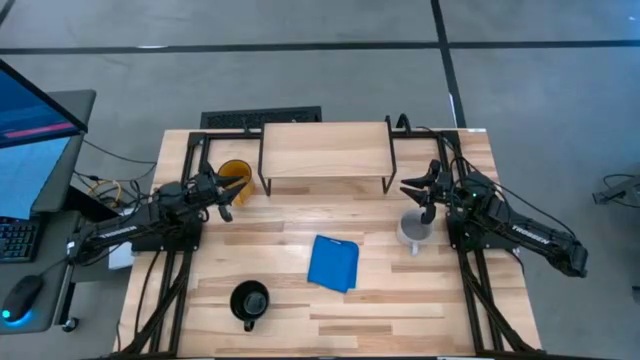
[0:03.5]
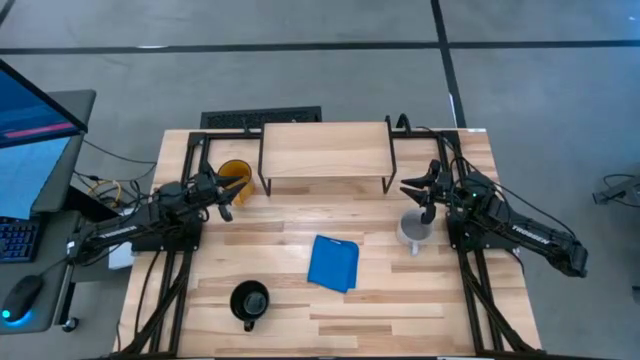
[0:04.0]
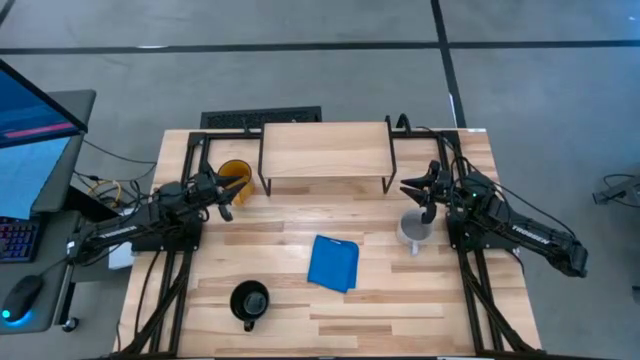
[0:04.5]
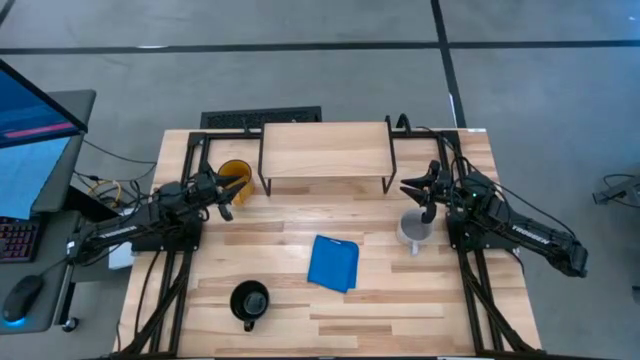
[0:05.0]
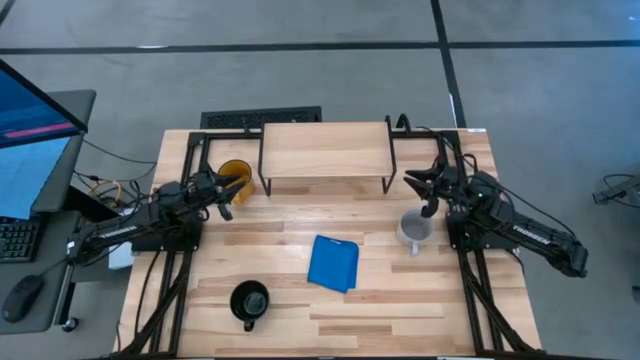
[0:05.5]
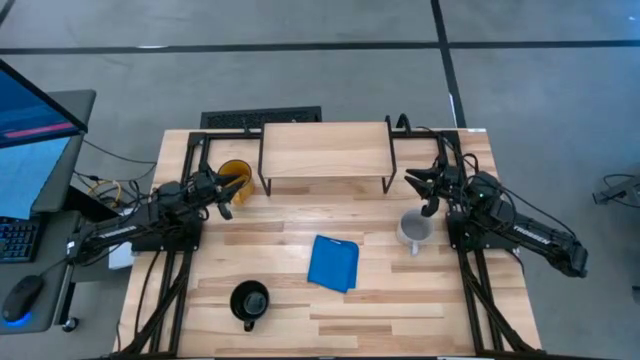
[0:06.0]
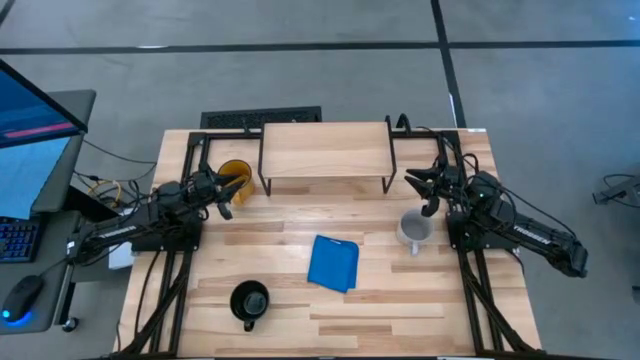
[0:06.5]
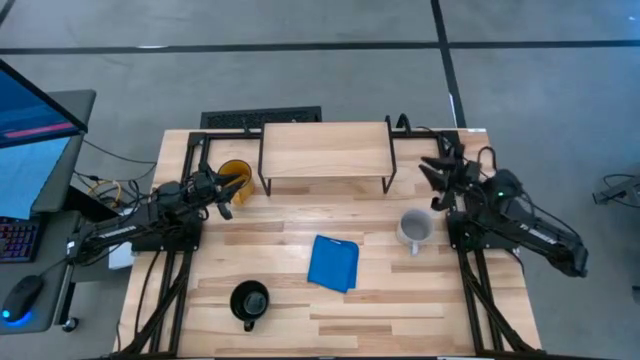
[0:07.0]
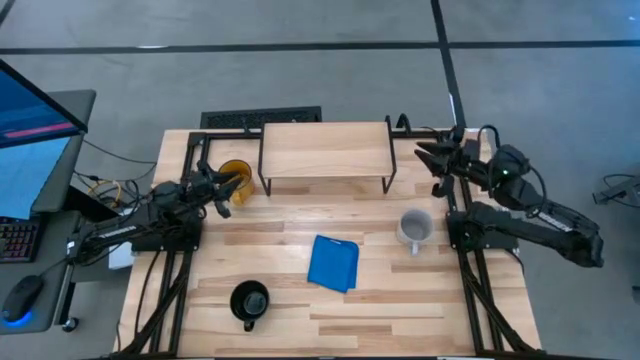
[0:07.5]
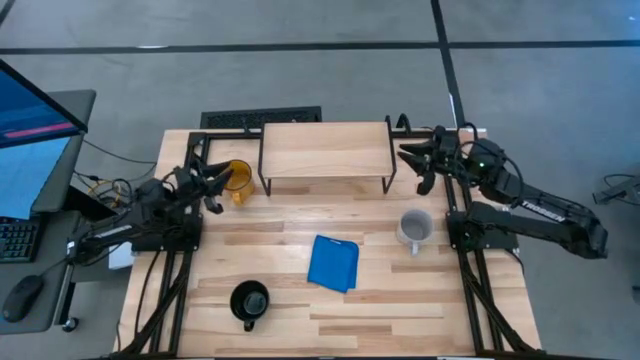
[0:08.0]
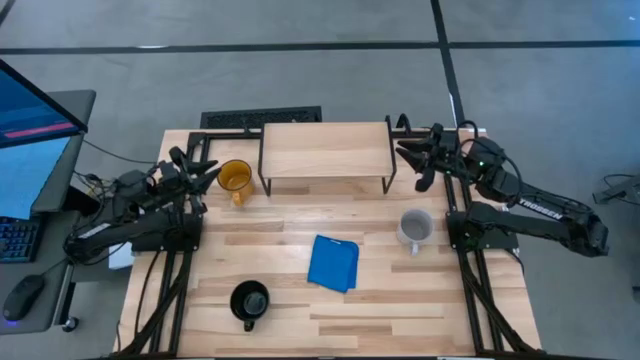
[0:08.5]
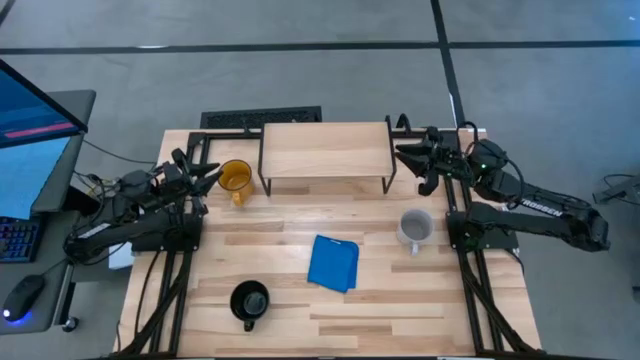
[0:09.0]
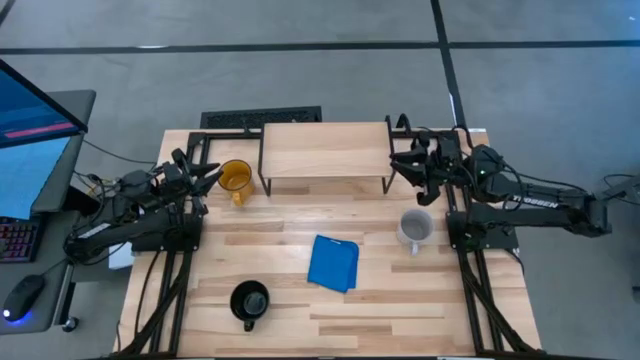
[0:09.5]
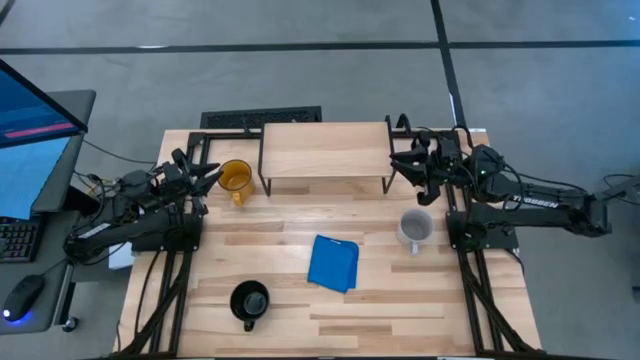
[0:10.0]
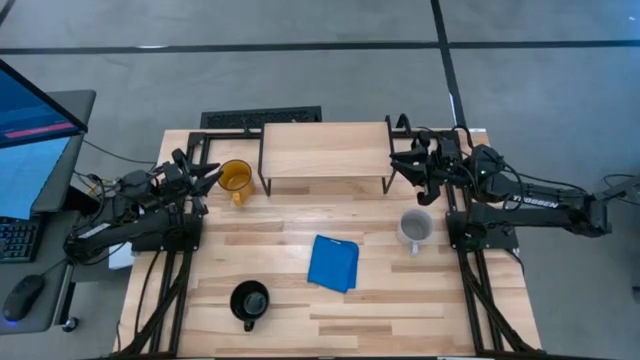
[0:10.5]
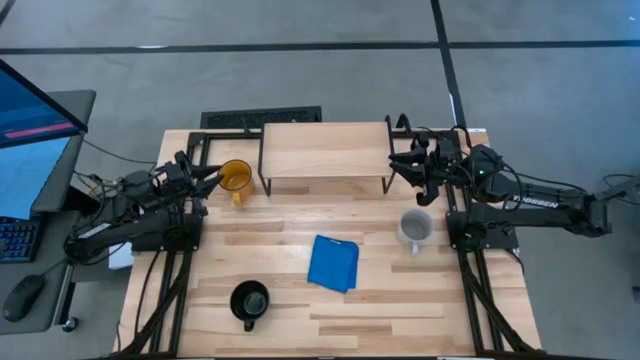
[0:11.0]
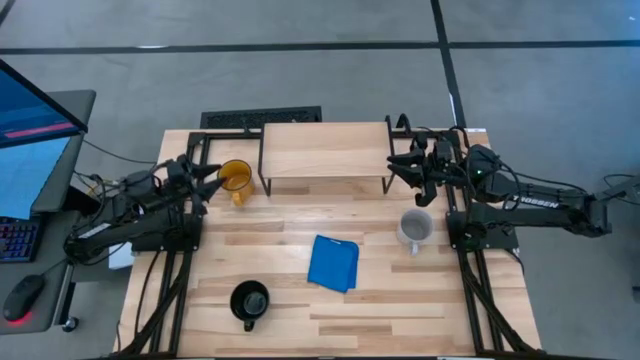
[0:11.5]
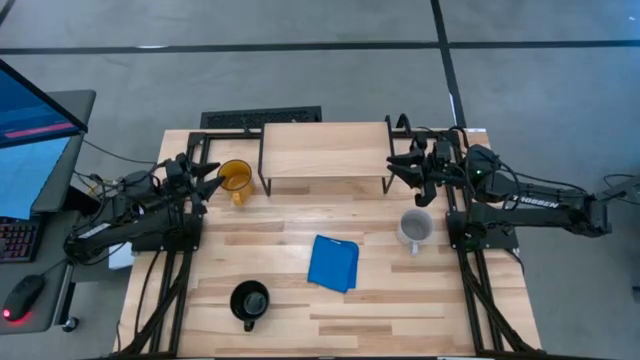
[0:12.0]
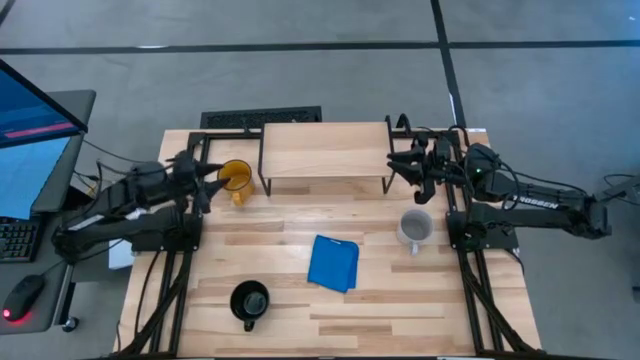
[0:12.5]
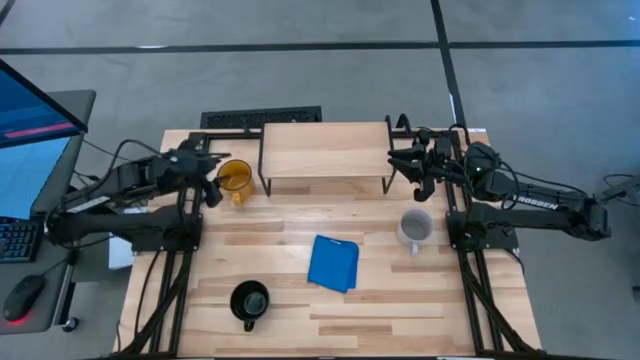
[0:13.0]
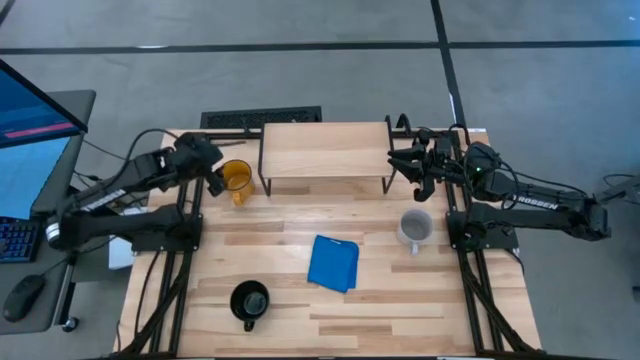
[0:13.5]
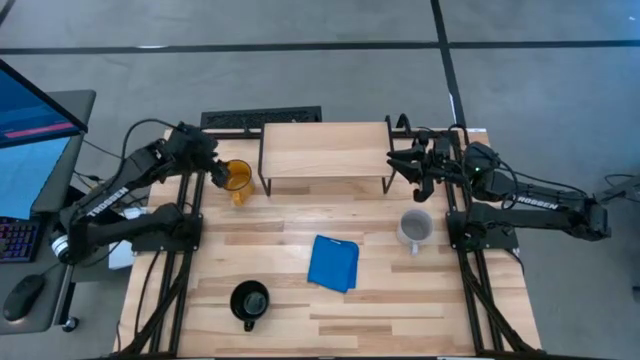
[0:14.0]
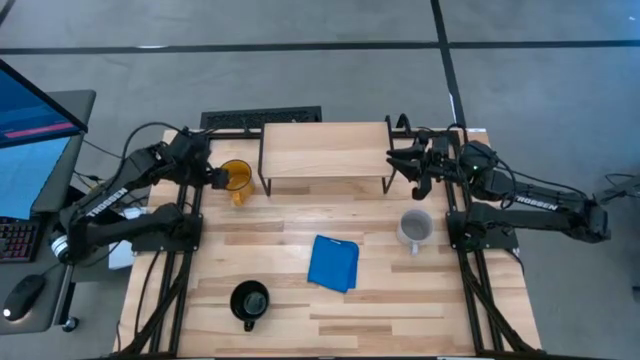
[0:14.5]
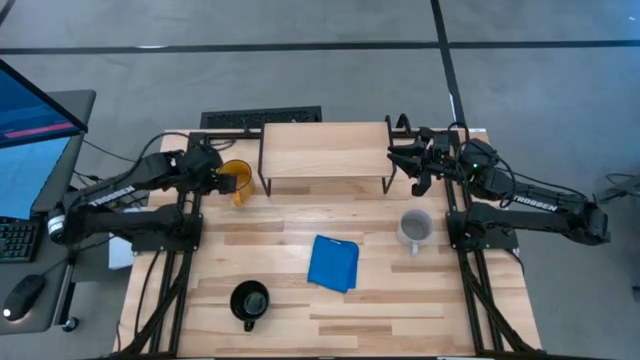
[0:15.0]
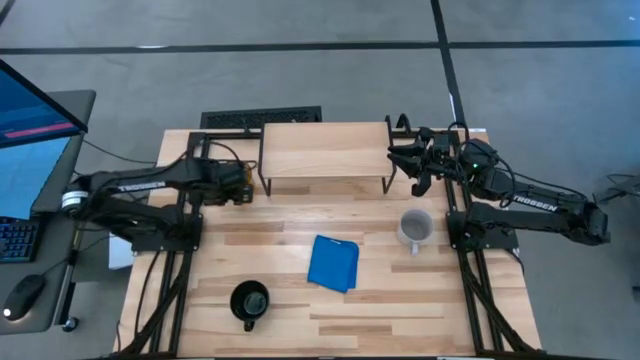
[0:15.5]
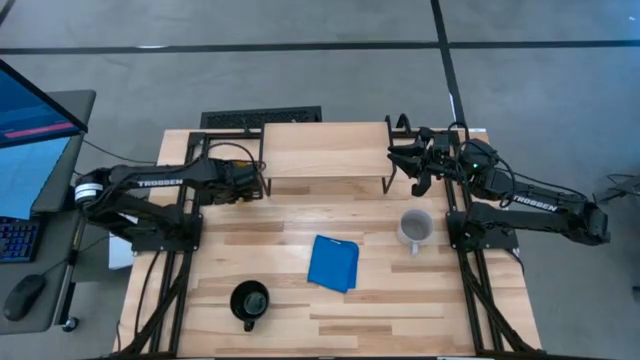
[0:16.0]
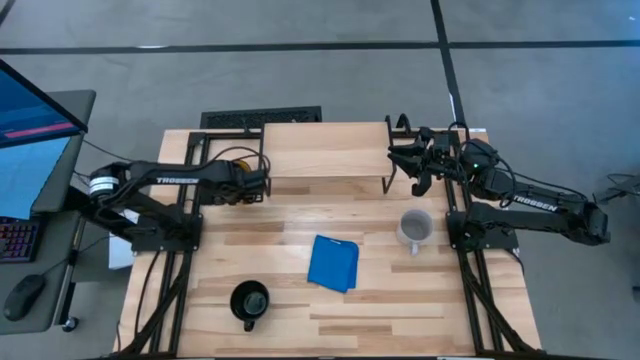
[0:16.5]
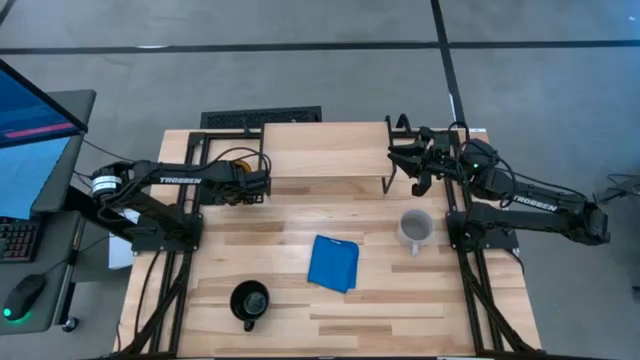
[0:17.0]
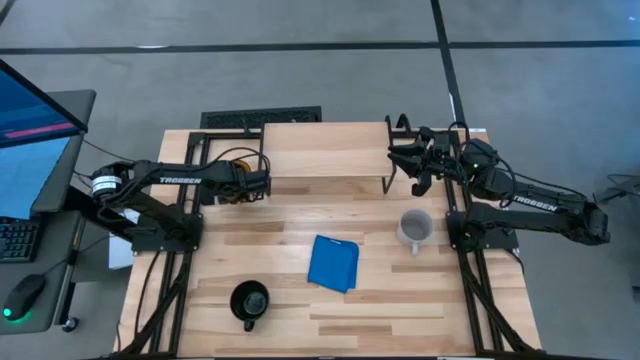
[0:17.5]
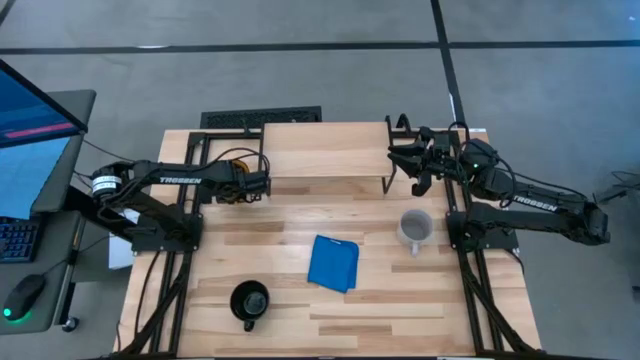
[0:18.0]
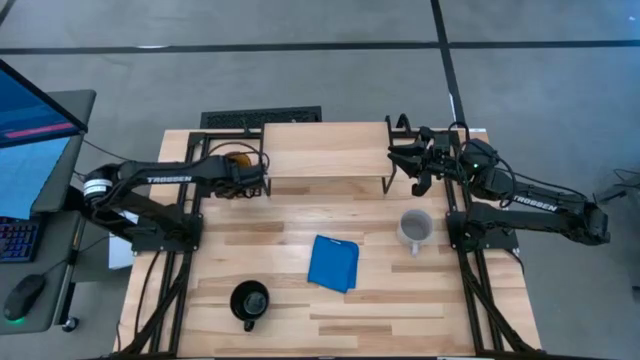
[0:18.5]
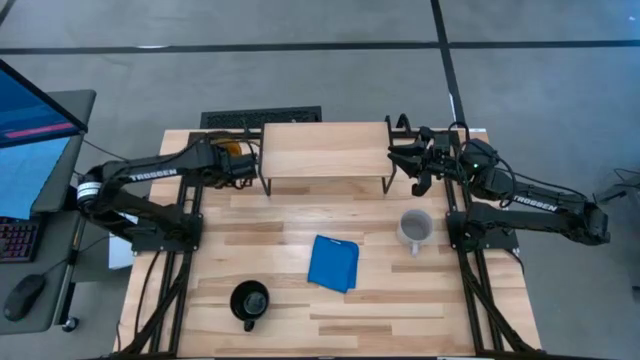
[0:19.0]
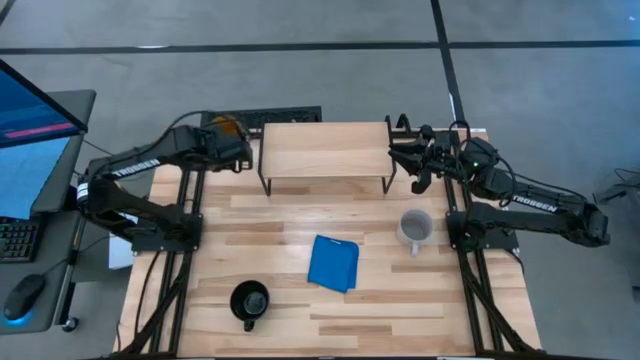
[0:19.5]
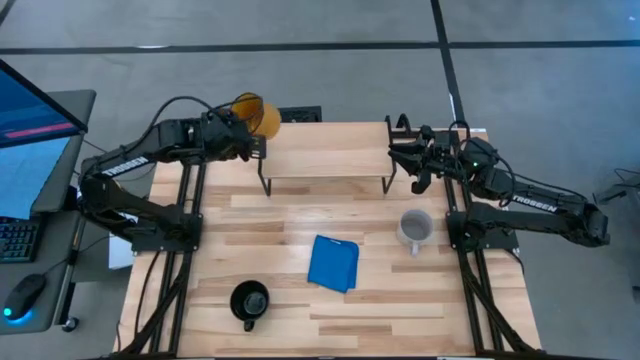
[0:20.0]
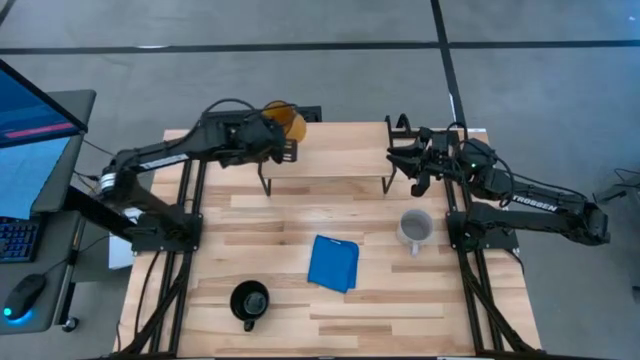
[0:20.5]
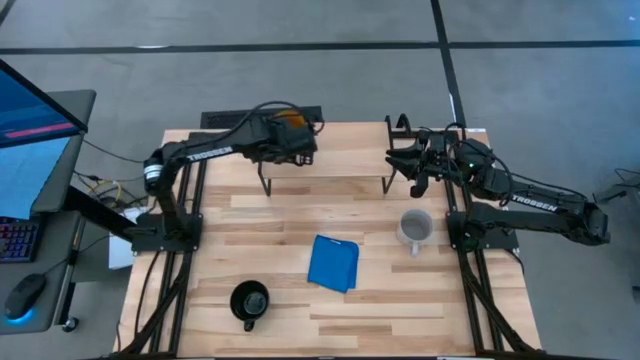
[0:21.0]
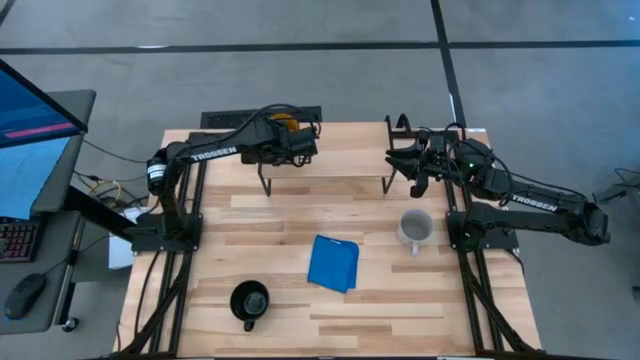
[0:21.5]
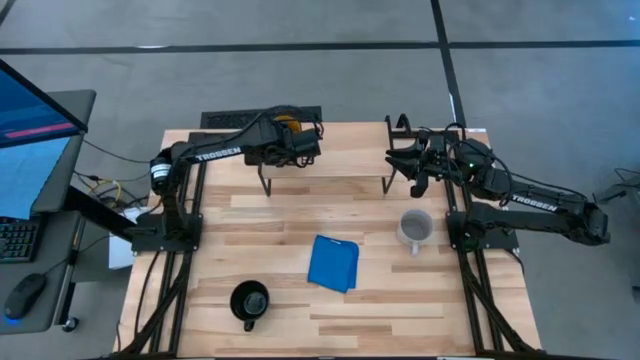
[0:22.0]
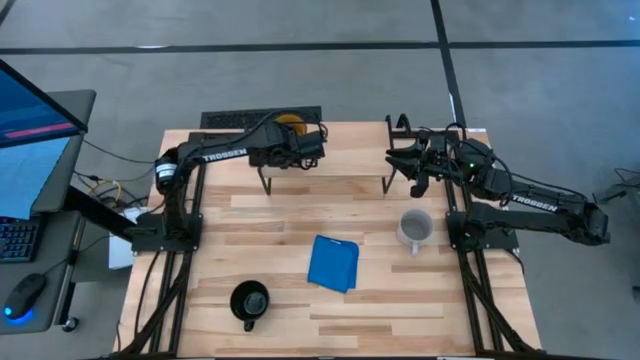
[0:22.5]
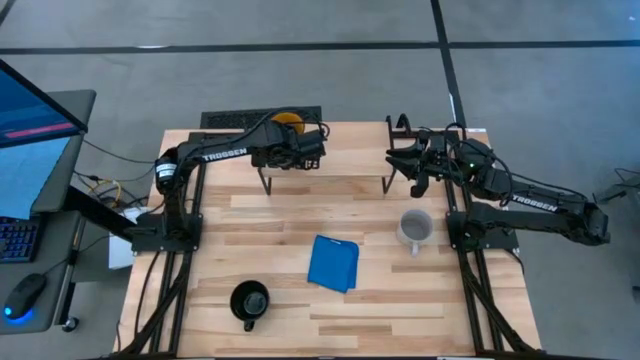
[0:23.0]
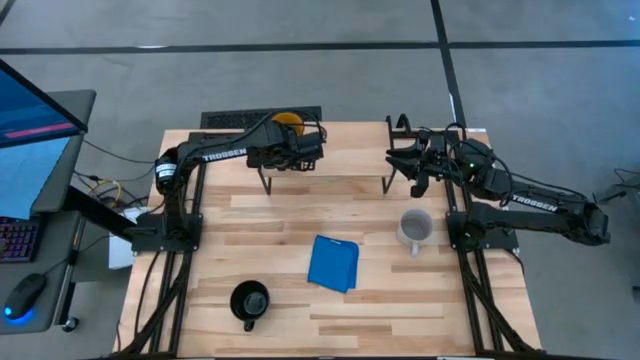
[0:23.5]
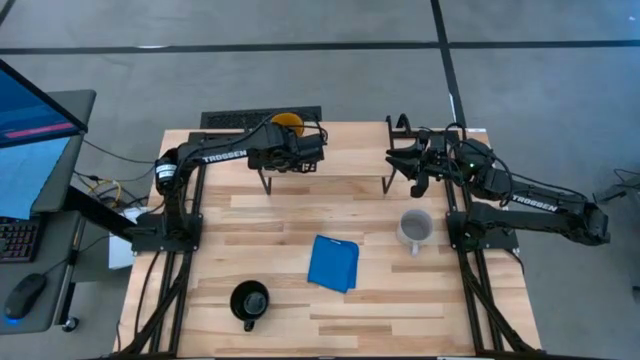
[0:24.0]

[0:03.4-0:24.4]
Task: Stack small to large cups/mugs on shelf
Put the yellow mug on the shelf
